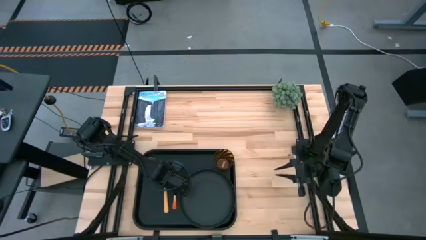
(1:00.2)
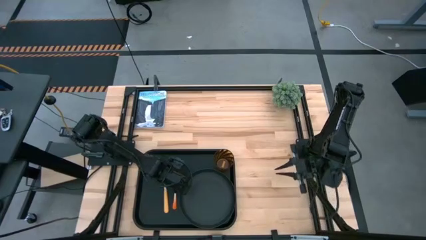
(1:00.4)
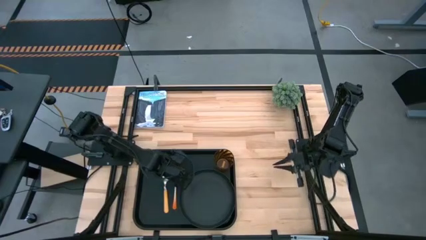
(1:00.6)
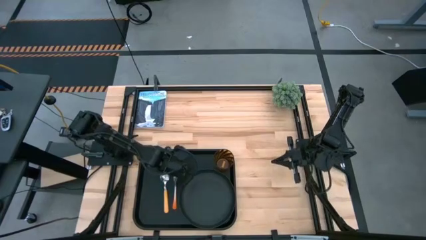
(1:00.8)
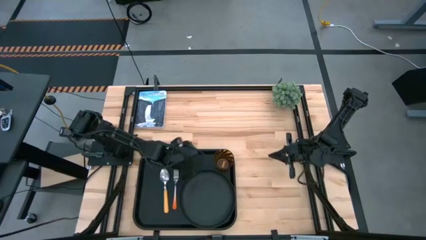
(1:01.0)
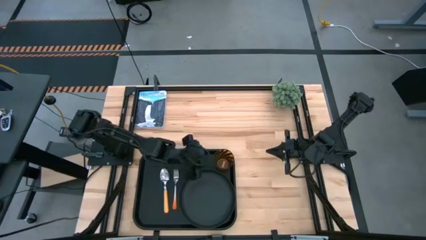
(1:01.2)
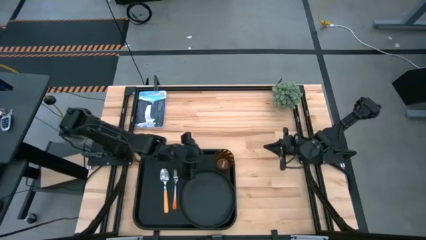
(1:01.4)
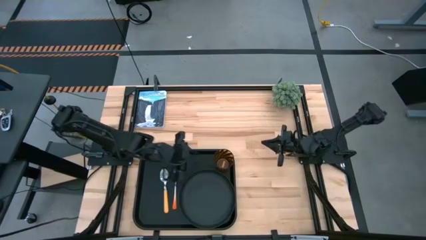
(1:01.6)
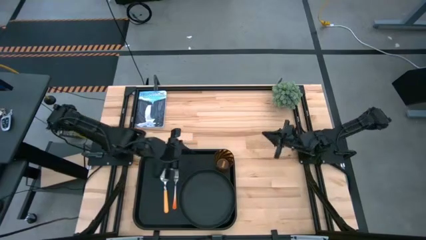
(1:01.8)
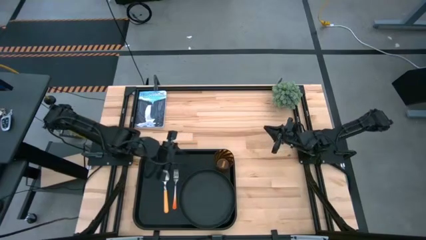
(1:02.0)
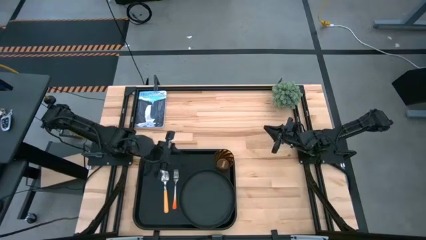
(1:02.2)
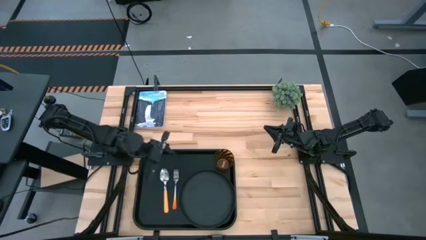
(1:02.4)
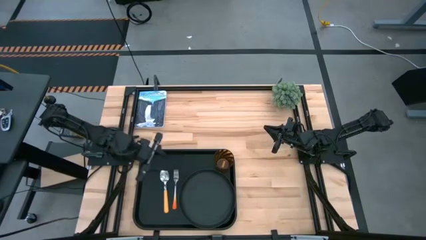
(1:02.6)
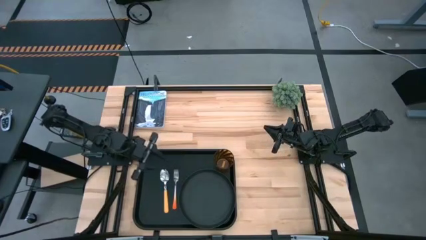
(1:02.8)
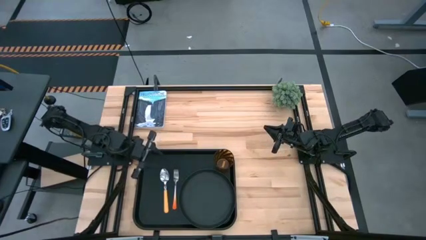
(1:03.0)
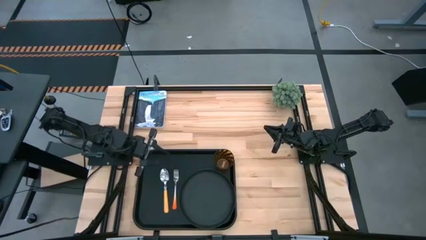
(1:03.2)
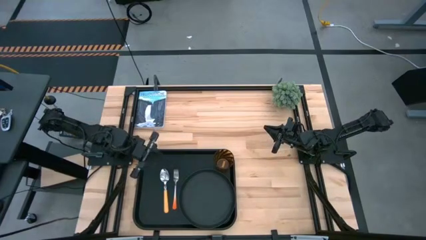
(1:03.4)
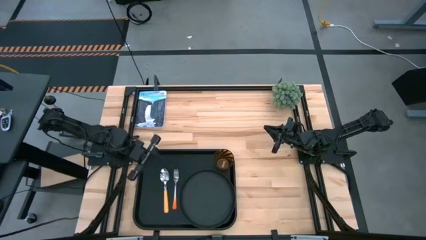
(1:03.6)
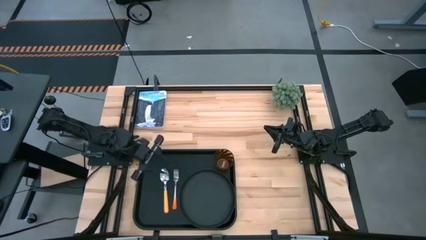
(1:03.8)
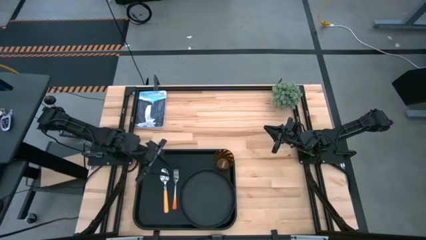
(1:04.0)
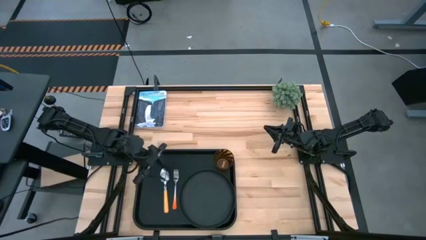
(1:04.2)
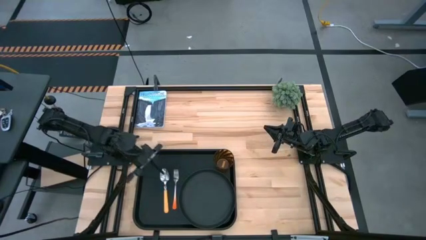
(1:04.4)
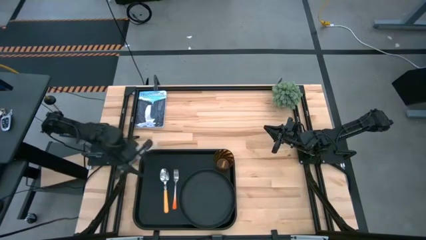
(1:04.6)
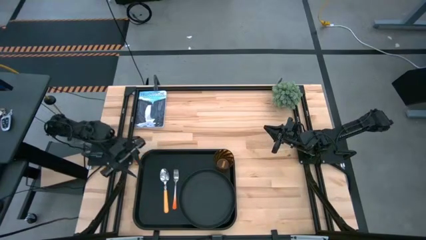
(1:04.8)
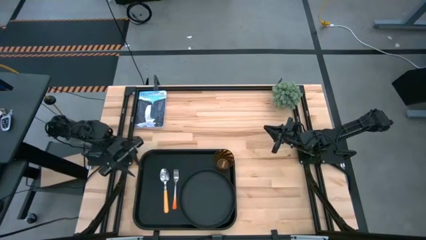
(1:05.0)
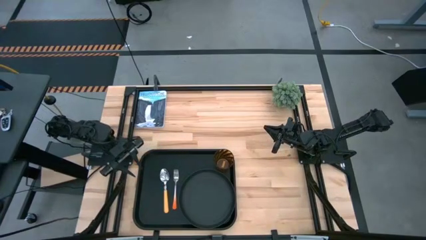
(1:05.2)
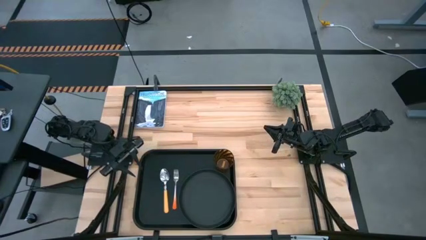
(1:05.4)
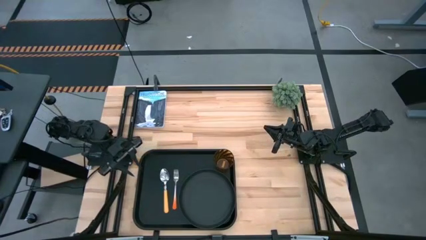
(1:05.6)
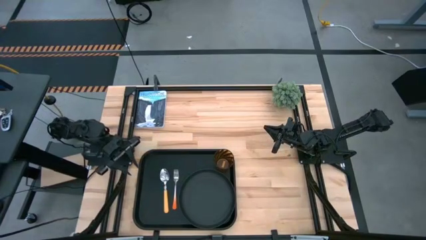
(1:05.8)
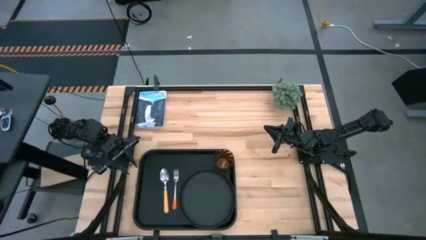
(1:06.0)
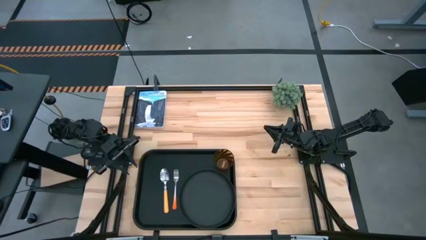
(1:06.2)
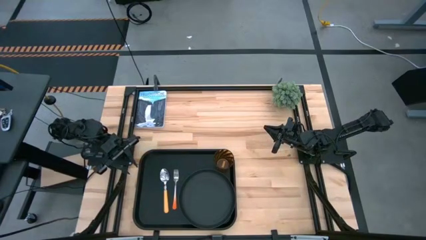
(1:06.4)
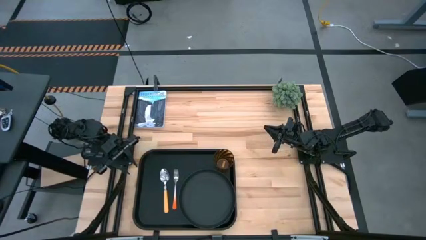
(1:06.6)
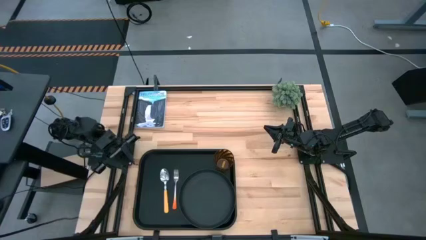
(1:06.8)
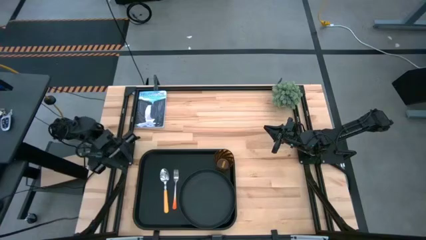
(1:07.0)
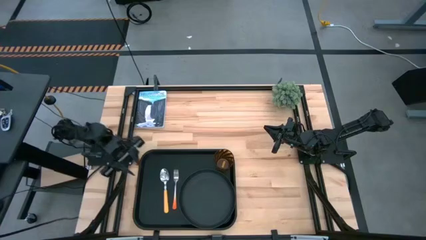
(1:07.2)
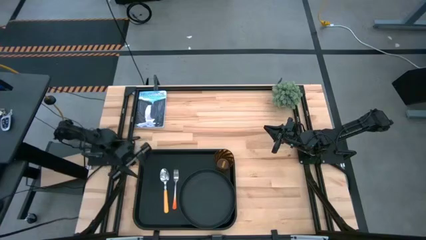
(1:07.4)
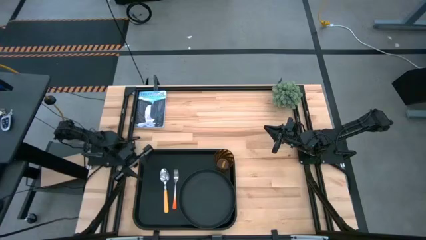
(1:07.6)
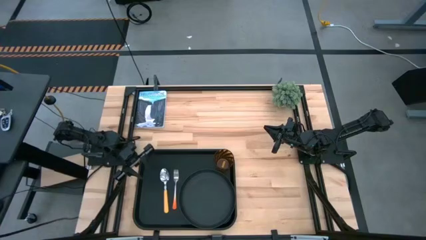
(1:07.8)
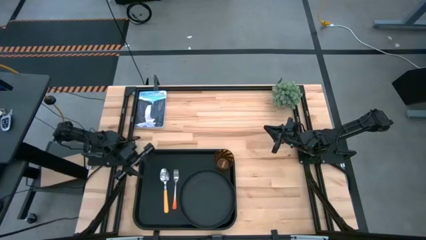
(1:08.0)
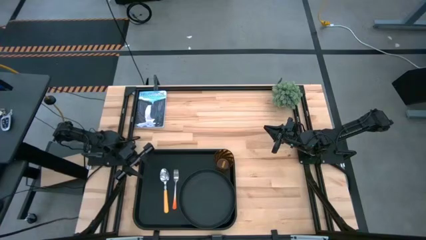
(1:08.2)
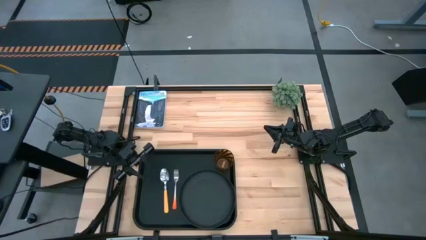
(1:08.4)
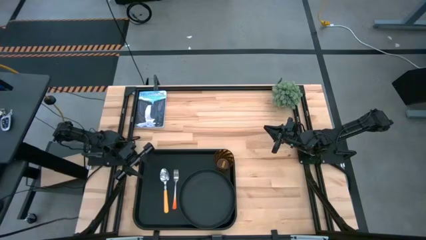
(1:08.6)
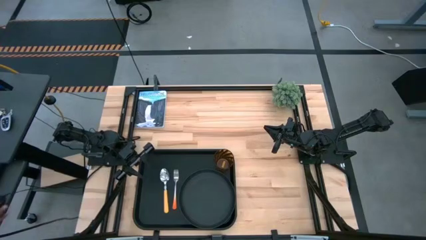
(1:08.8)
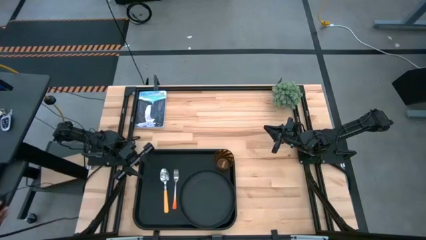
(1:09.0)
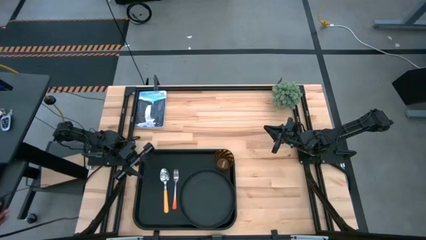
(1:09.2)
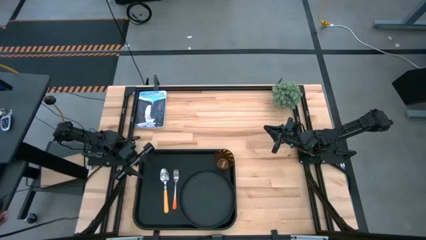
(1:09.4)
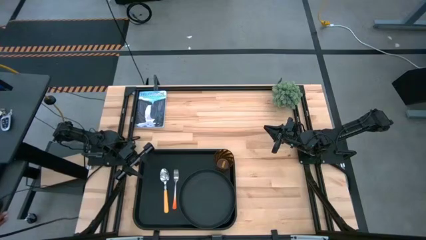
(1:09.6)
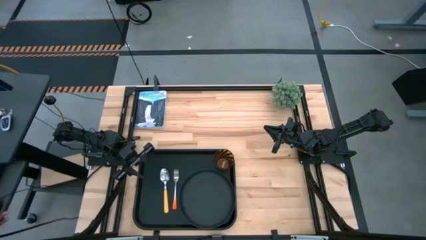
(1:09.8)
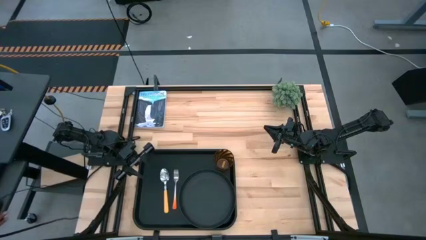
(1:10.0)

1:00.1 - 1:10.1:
Task: Pick and place plate/cup/fork/spoon on tray
Return to Home Position

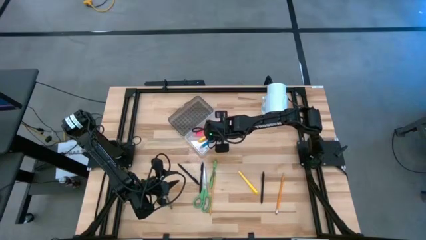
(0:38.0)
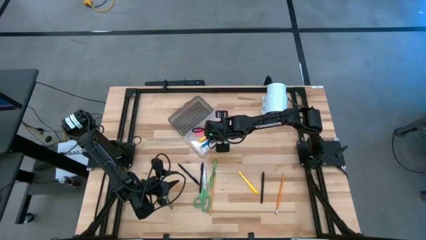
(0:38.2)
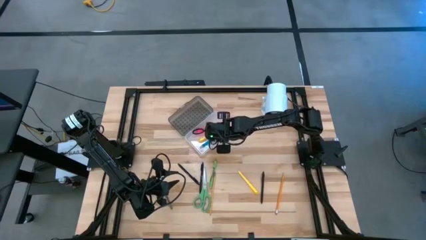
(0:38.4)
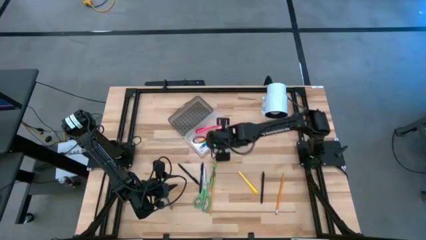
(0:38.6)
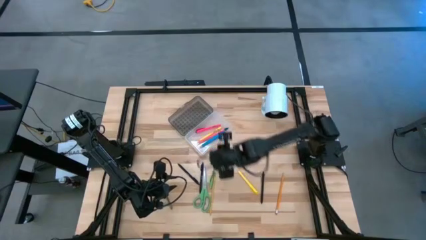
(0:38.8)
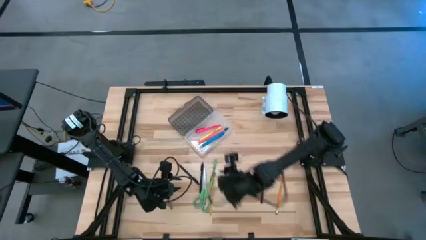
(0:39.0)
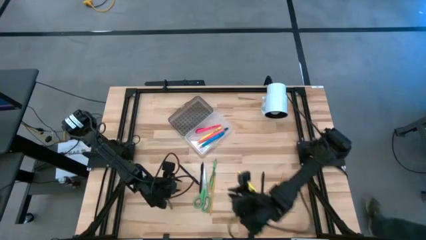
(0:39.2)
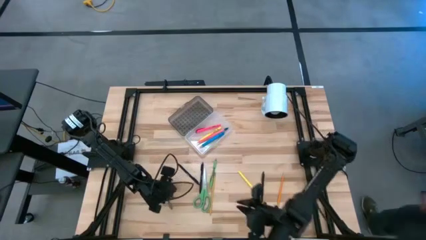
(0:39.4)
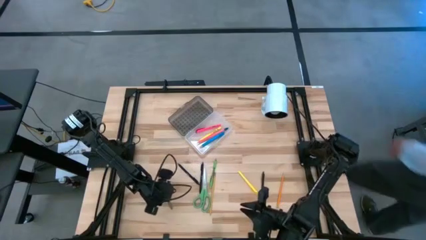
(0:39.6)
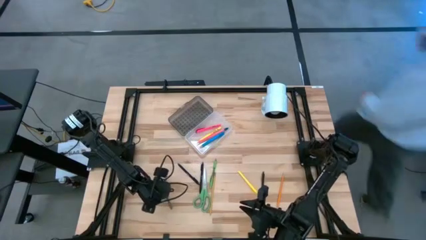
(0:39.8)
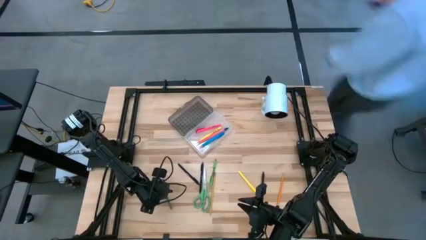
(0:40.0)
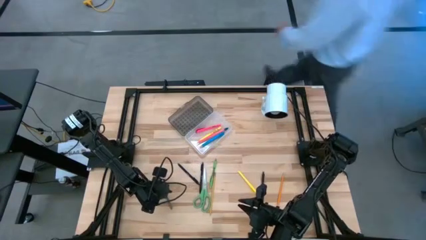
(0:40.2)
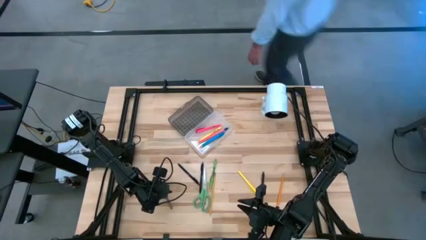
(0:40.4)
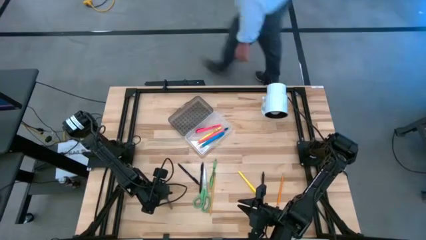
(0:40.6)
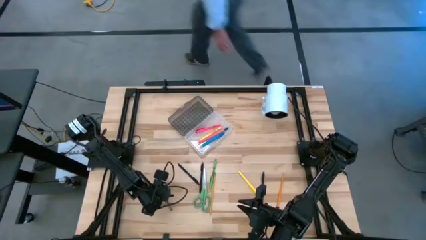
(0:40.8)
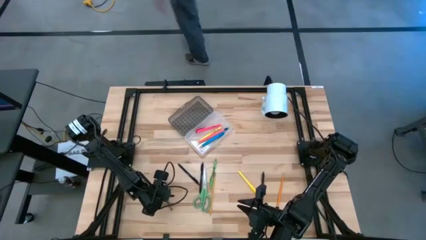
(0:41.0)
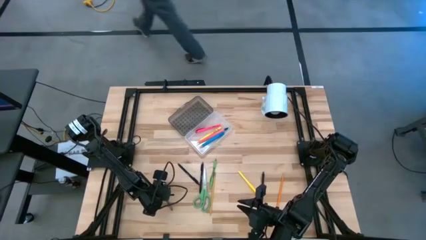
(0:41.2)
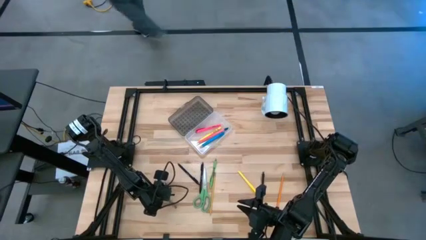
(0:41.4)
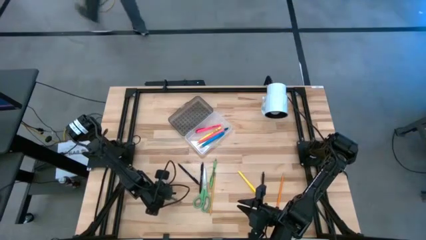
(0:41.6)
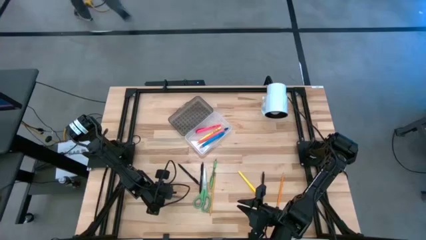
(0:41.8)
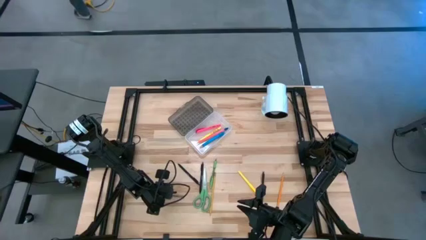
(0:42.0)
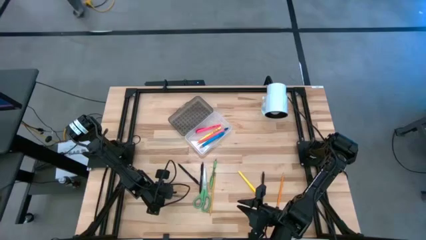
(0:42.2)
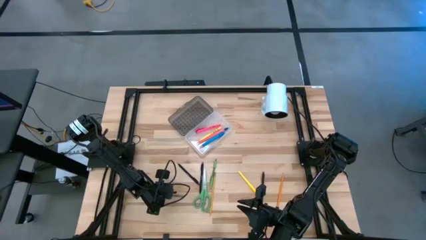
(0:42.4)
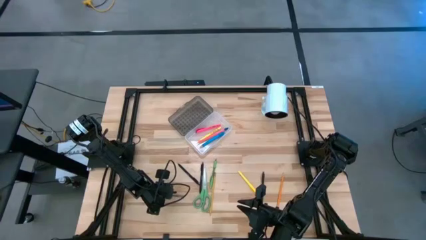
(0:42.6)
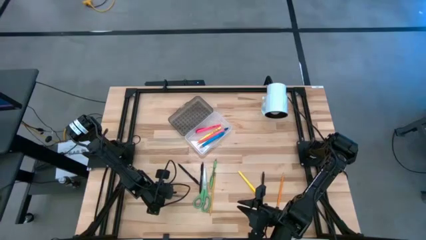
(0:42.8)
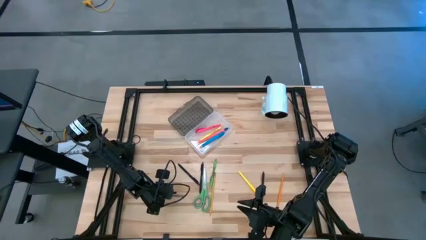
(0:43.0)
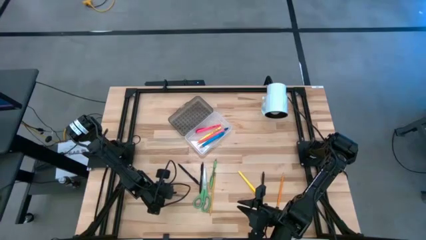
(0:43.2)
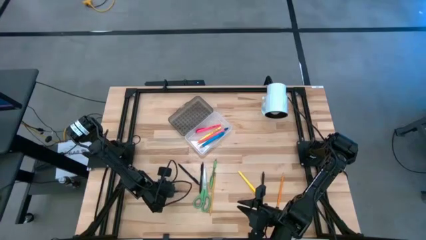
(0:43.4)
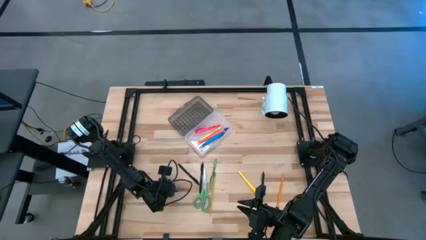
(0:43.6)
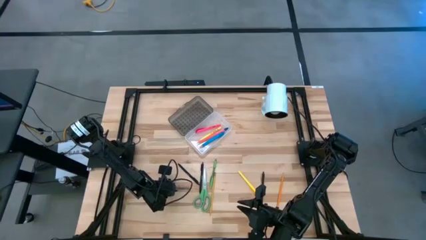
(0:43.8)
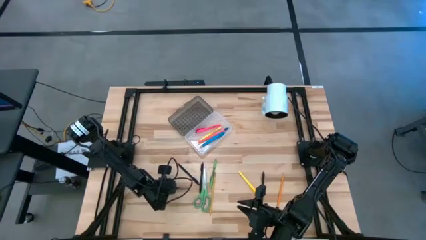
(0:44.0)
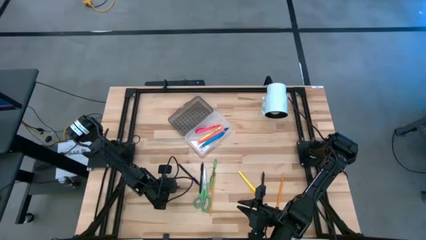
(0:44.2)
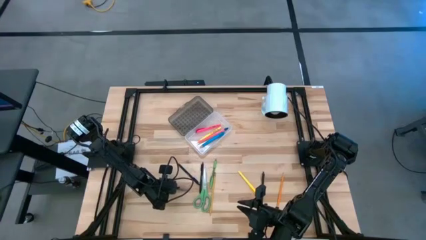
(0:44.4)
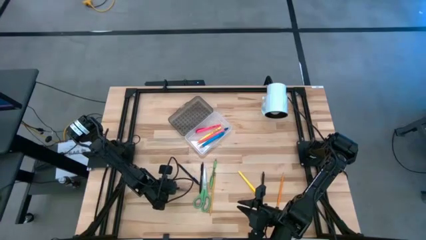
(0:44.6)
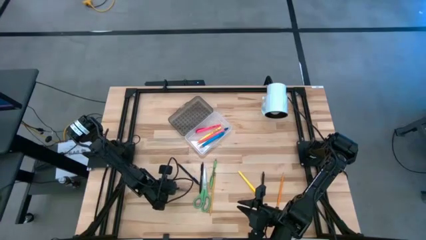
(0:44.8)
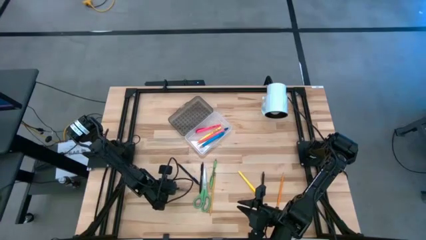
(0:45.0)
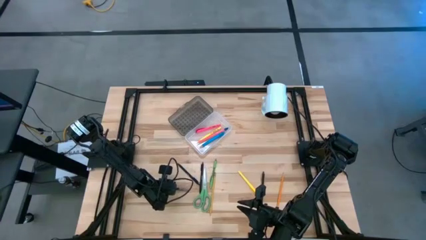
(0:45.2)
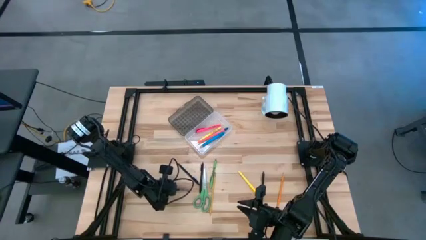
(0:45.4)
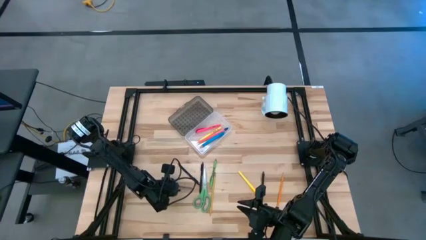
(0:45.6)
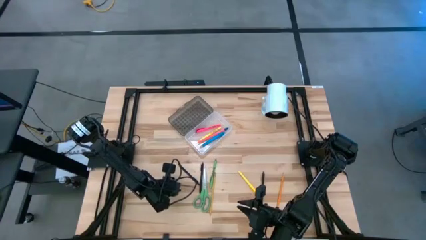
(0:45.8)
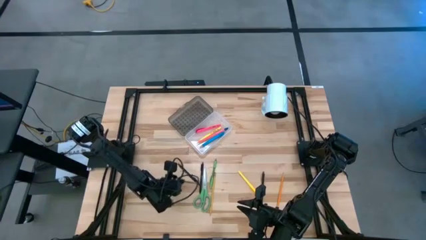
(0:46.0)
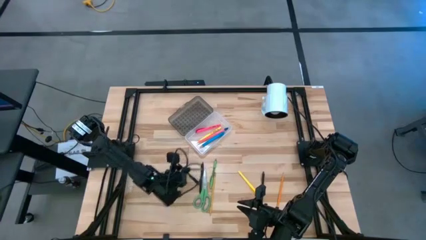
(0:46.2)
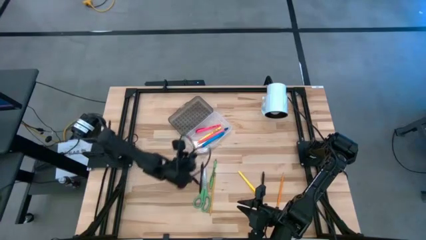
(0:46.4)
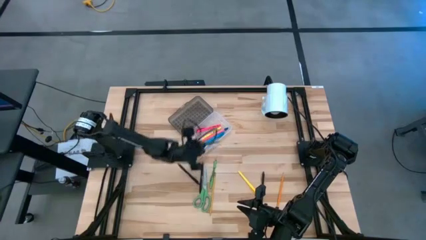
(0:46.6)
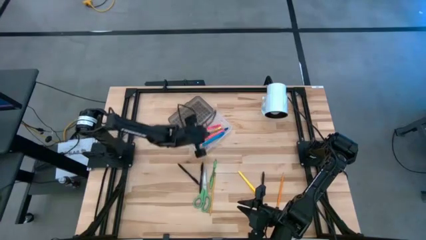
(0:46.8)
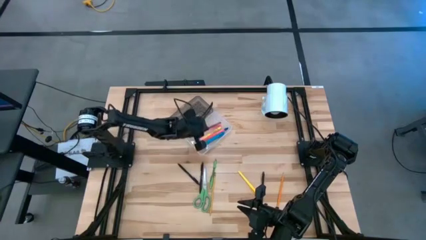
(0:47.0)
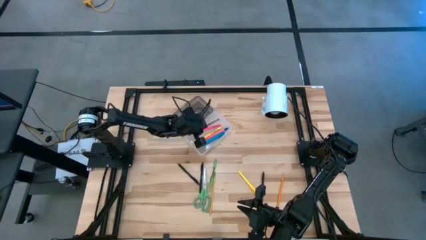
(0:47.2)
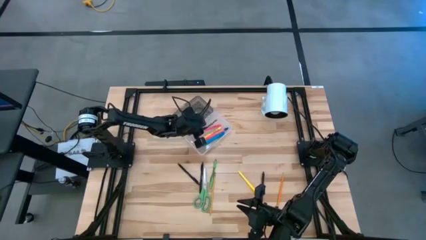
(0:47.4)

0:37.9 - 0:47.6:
Task: Pick & place school supplies into a supply box
Put the gray pen into the transparent supply box
